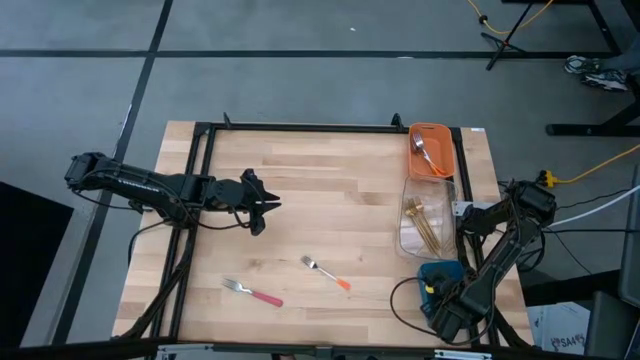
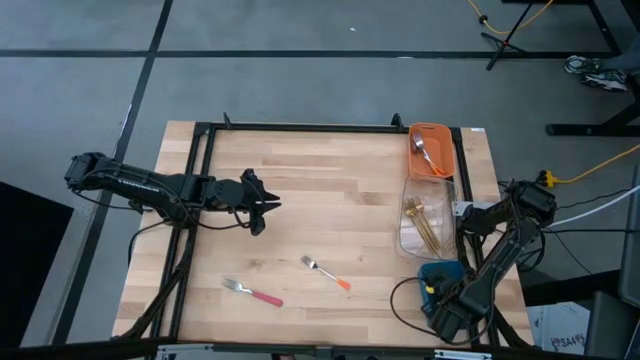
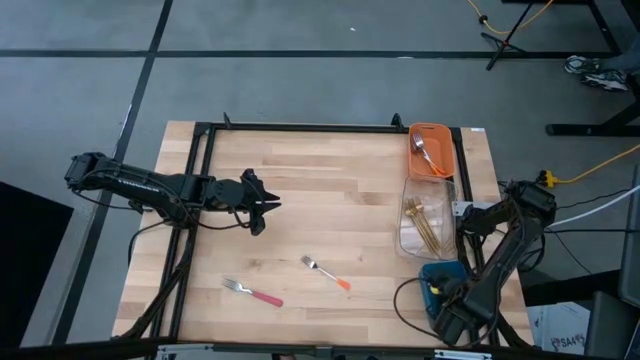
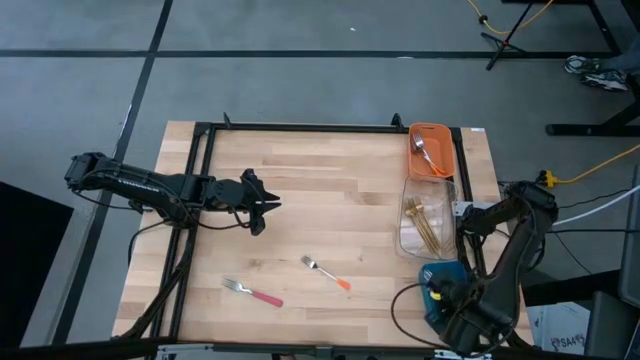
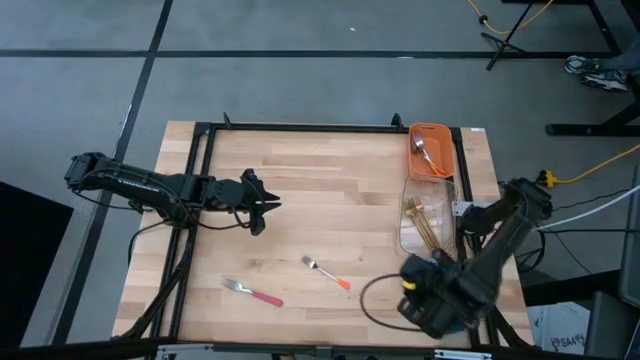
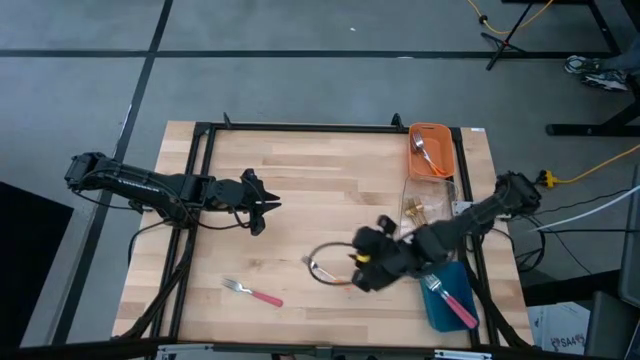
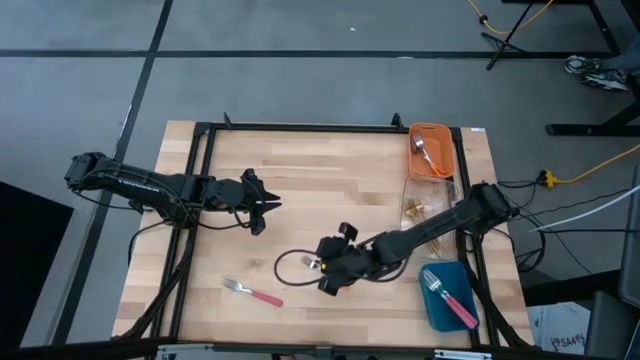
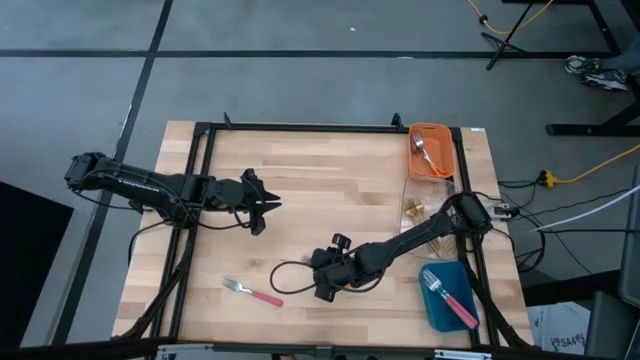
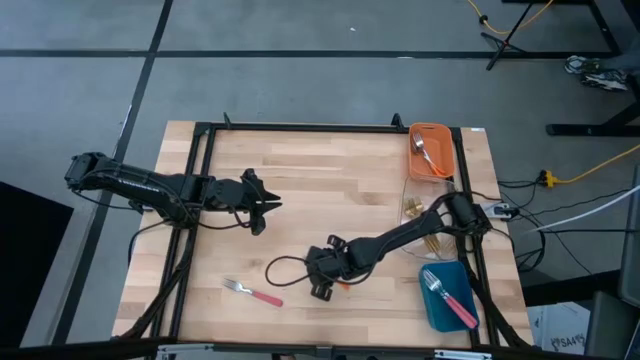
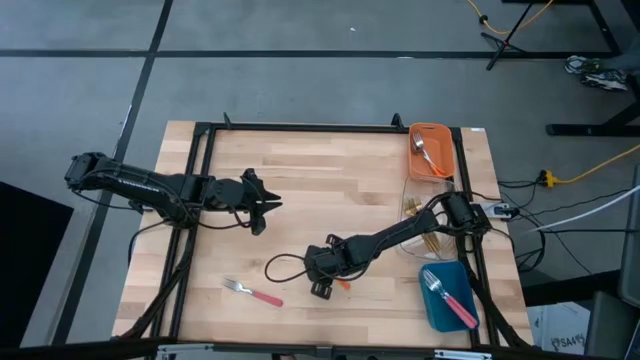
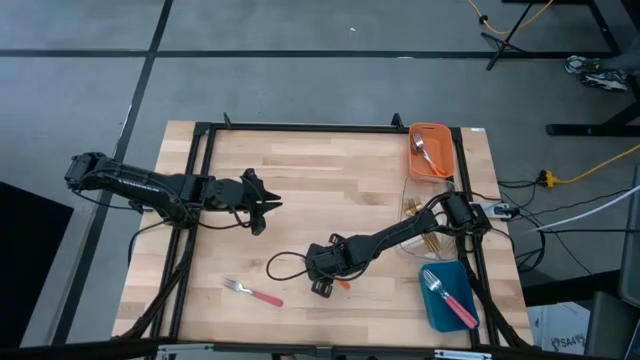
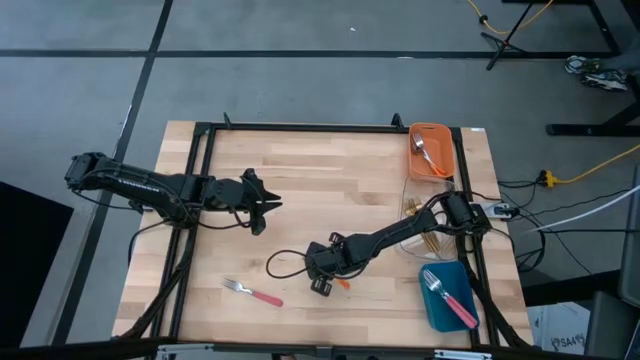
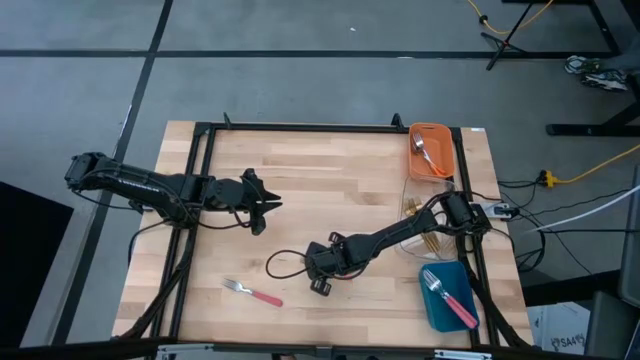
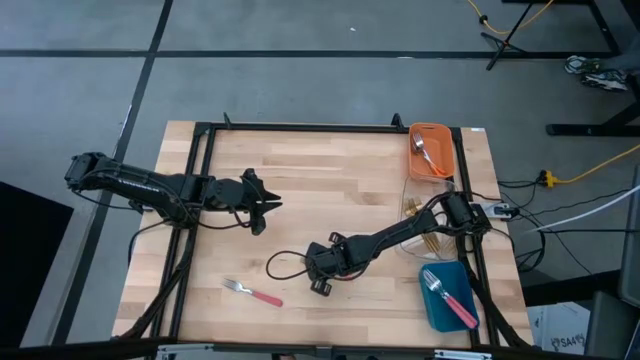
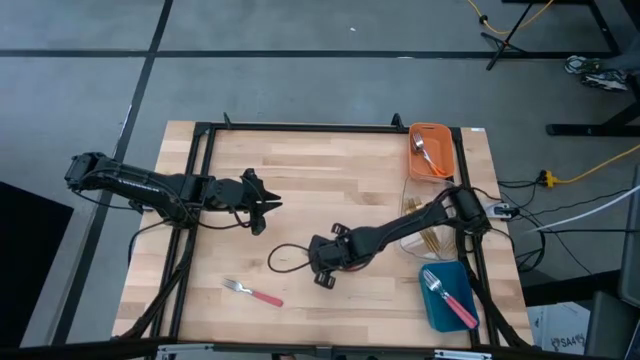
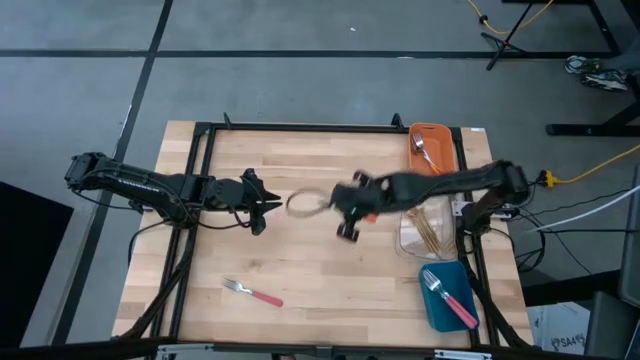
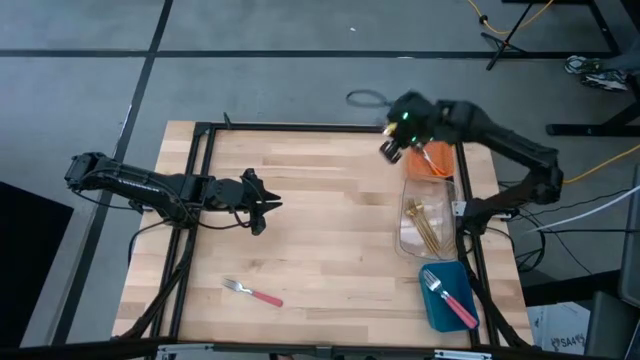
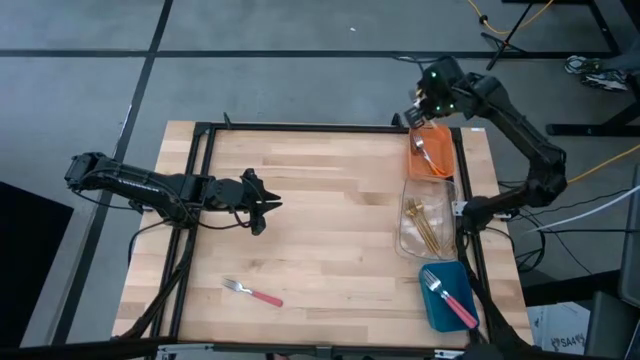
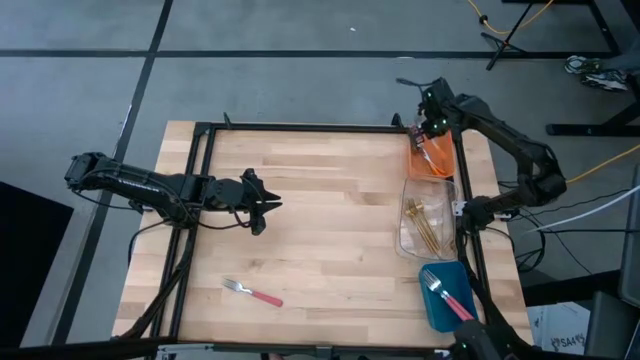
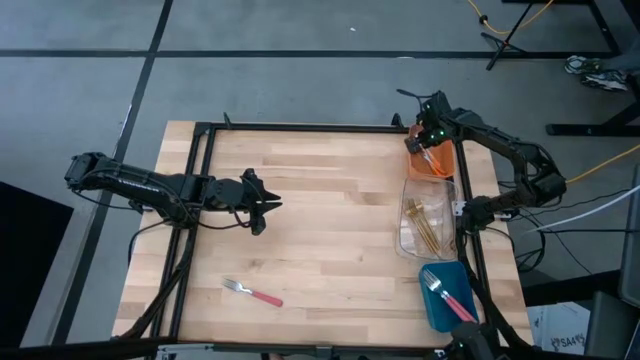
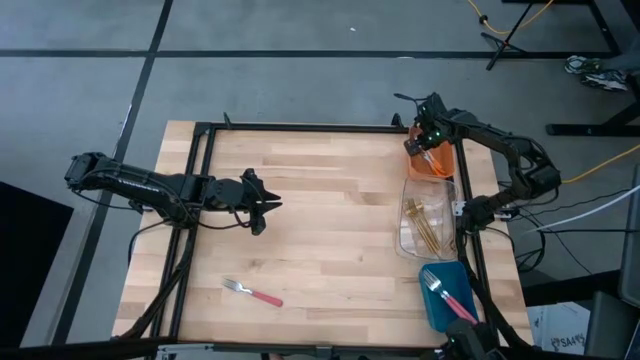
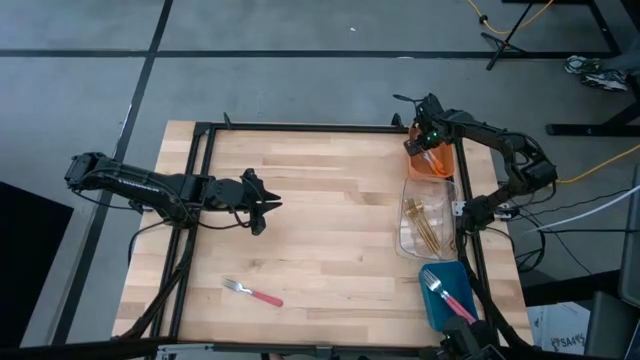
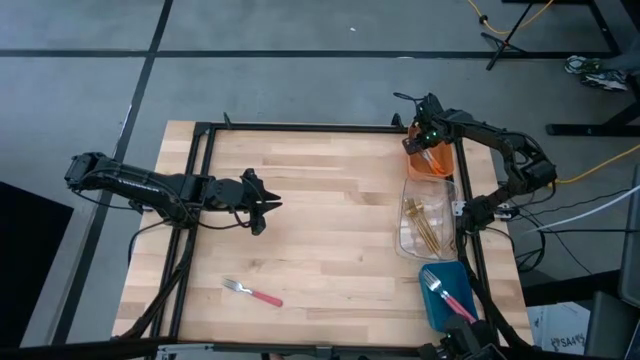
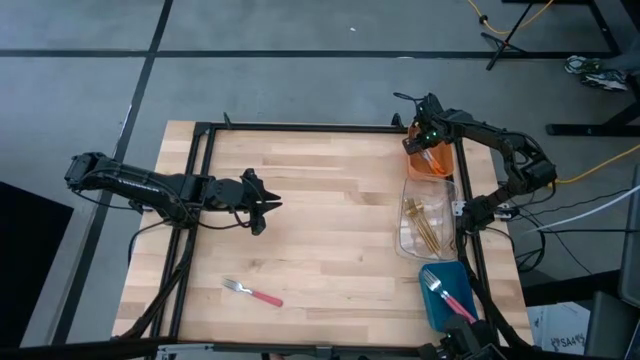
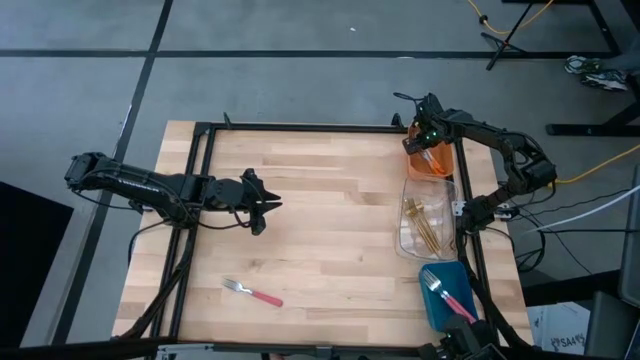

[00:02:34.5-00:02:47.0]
Task: Sort silverware by color (type)
Put the orange fork into the orange bin

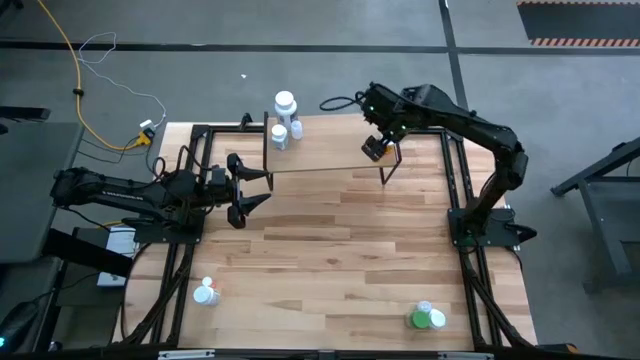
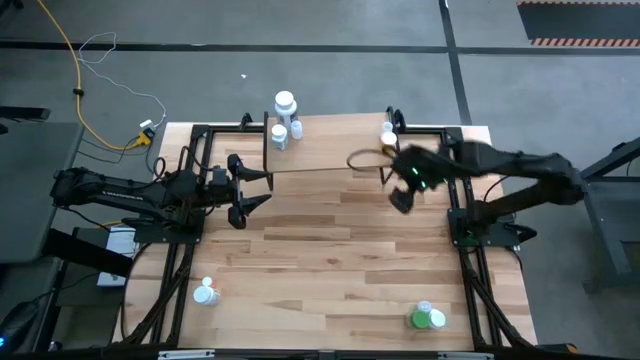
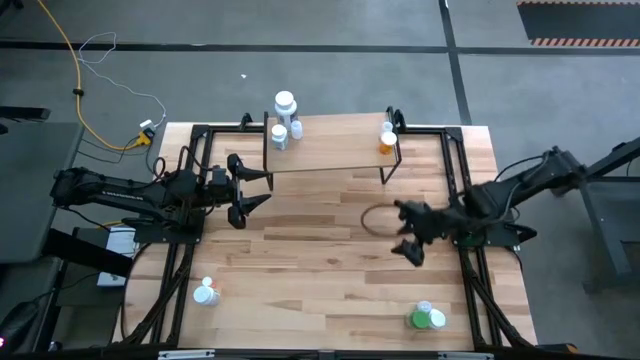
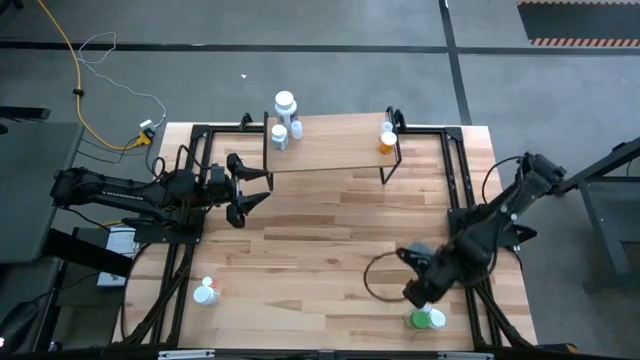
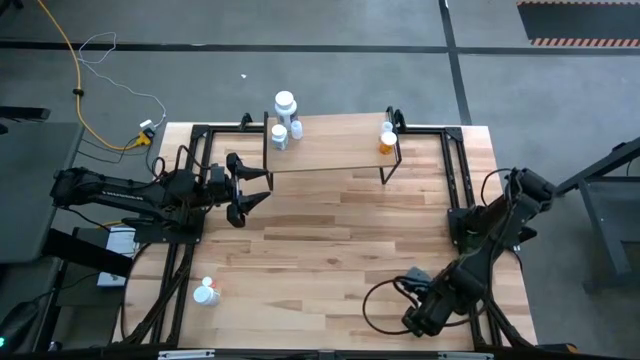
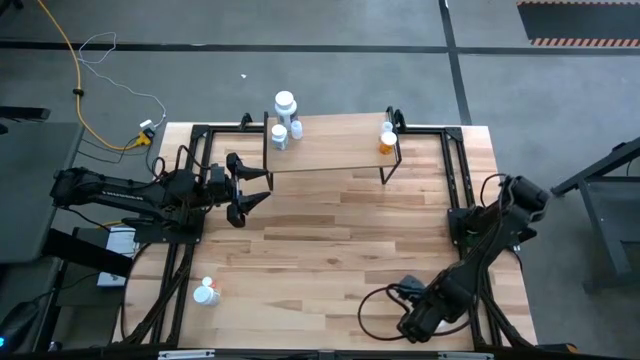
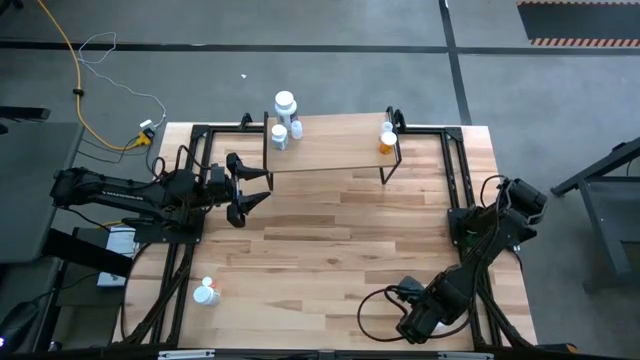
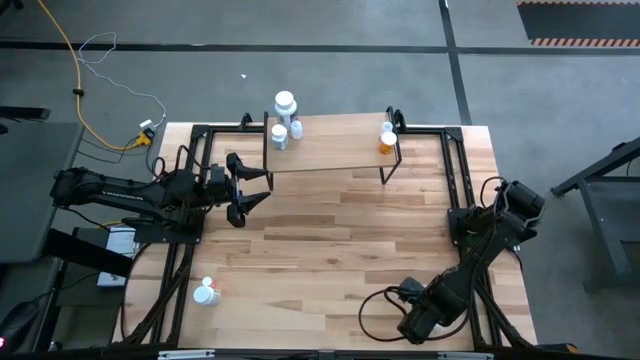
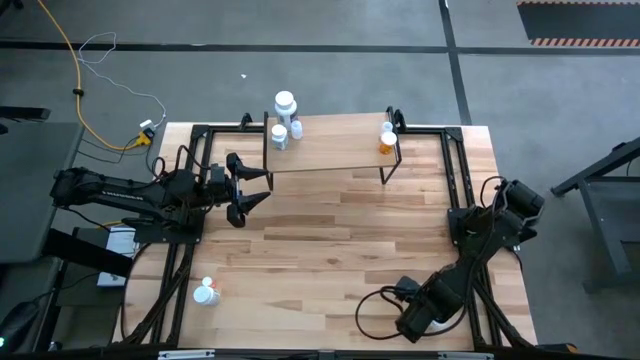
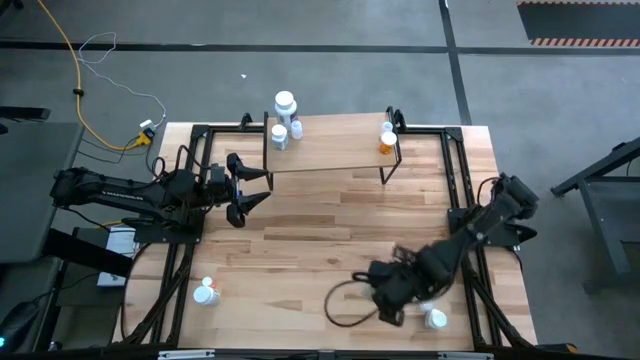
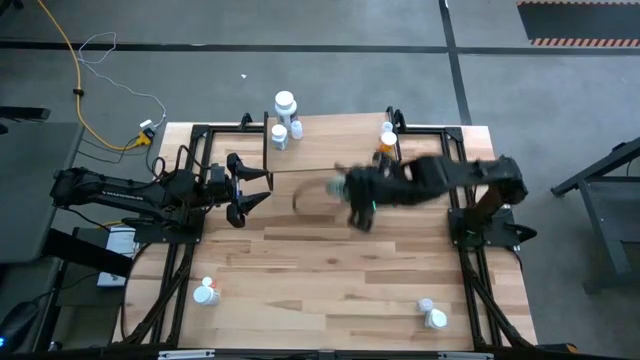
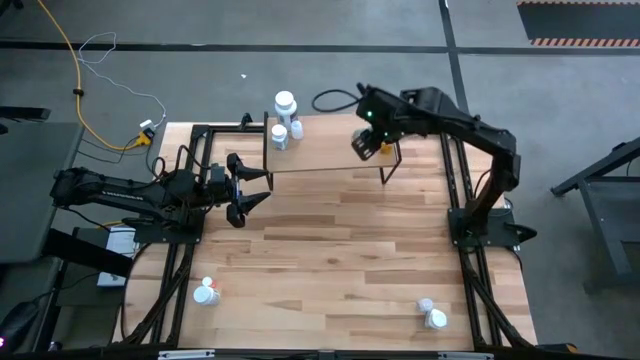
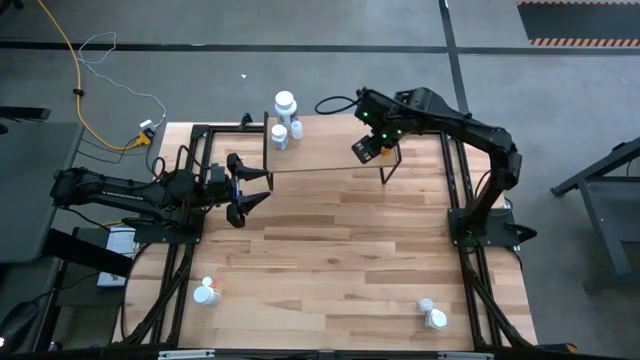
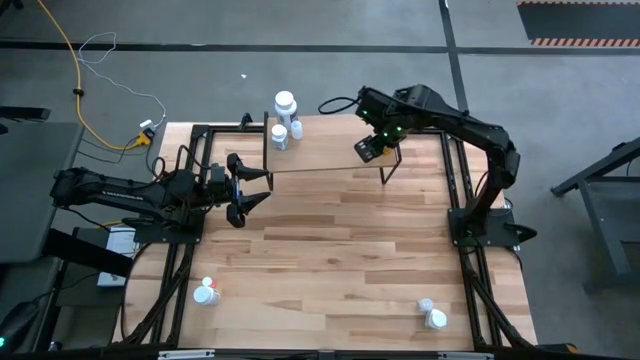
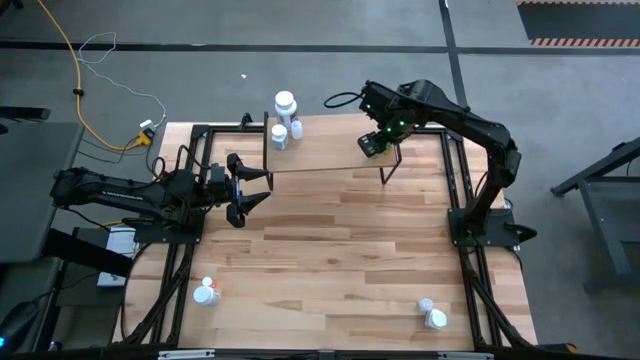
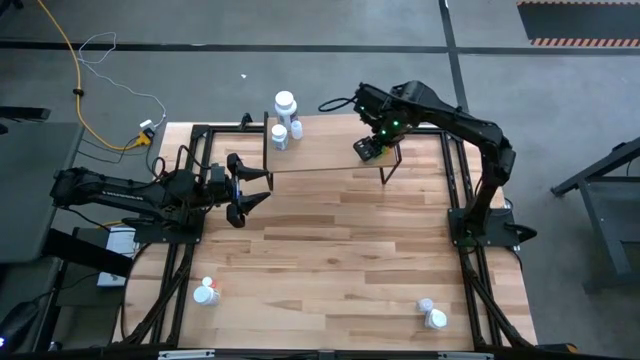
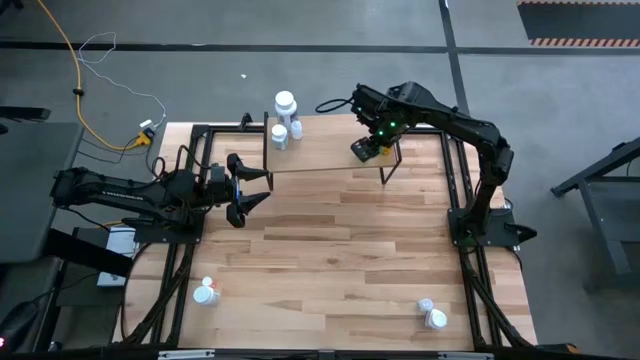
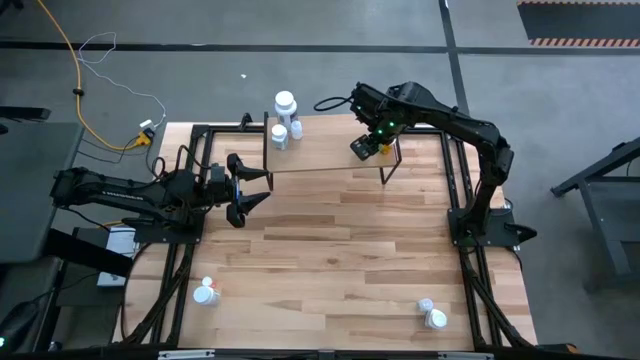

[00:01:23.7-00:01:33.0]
Task: Pick and place medicine bottles onto shelf by color
Put the green pill bottle on the shelf
